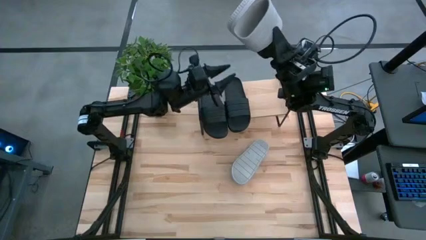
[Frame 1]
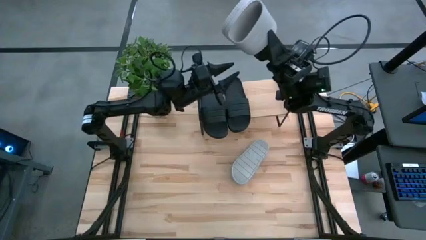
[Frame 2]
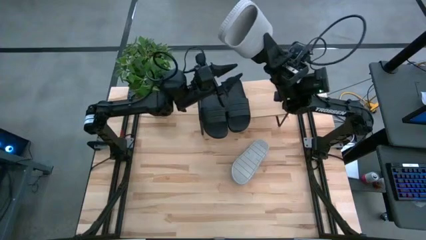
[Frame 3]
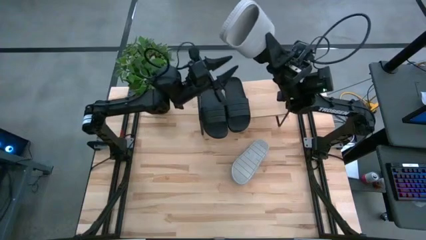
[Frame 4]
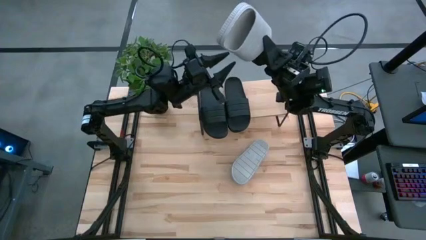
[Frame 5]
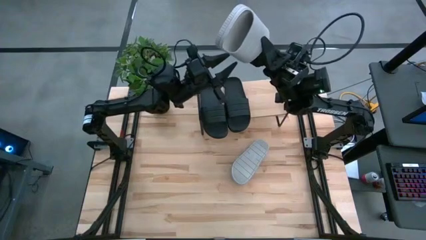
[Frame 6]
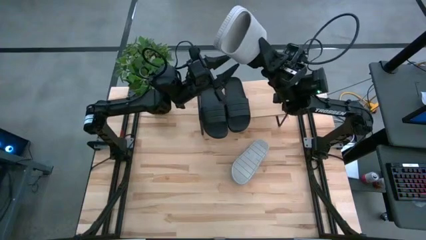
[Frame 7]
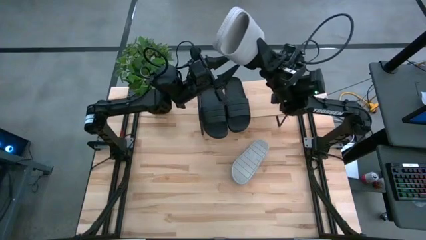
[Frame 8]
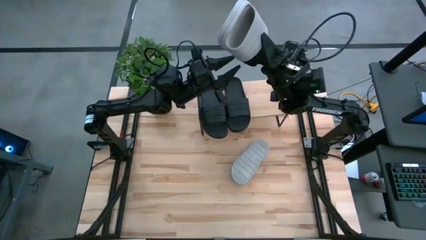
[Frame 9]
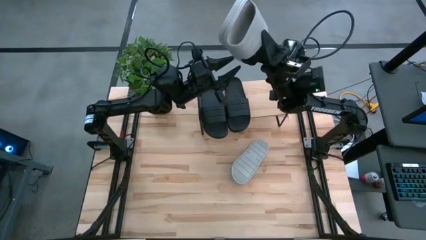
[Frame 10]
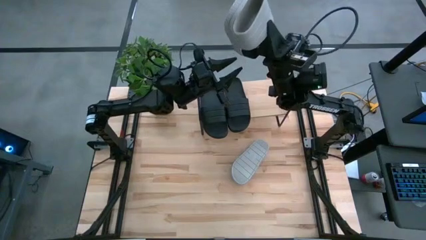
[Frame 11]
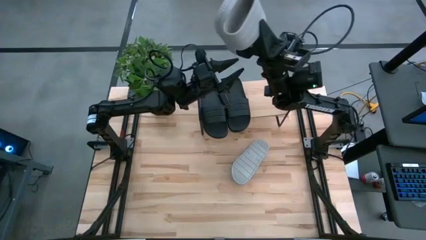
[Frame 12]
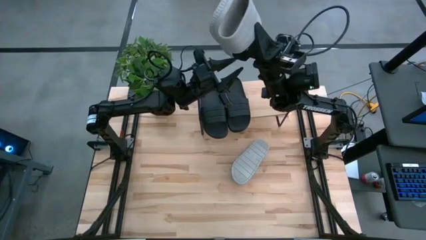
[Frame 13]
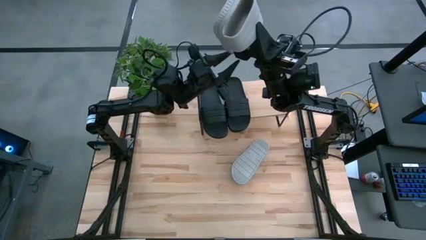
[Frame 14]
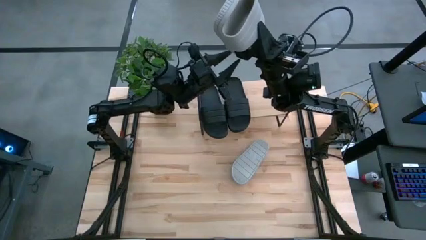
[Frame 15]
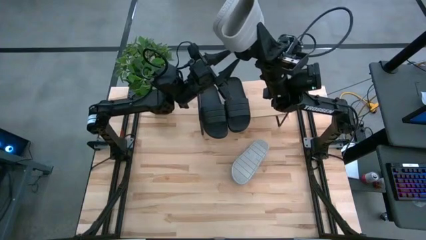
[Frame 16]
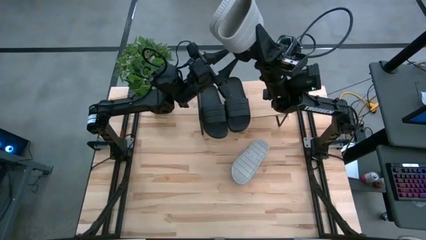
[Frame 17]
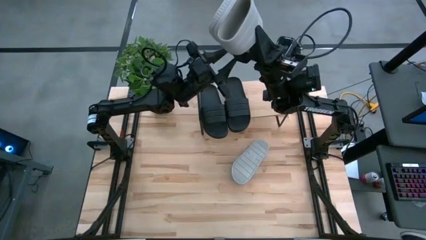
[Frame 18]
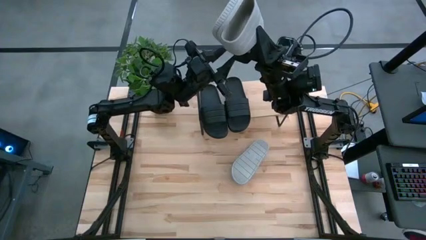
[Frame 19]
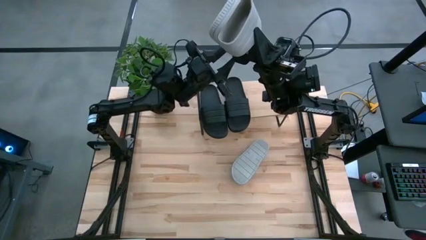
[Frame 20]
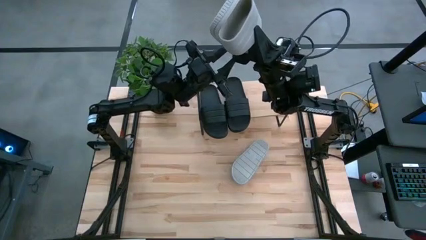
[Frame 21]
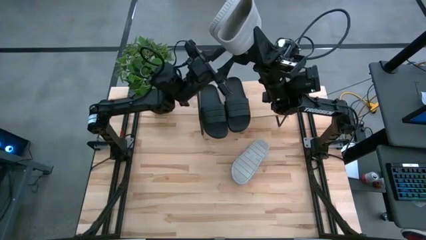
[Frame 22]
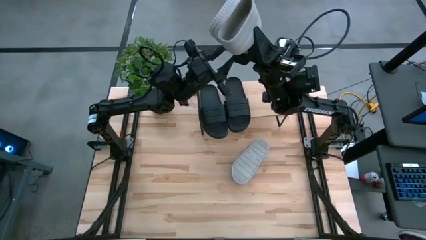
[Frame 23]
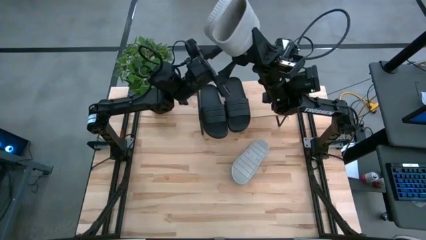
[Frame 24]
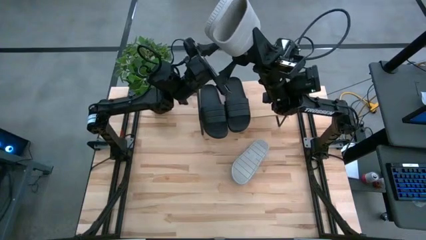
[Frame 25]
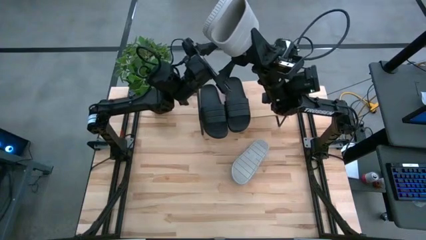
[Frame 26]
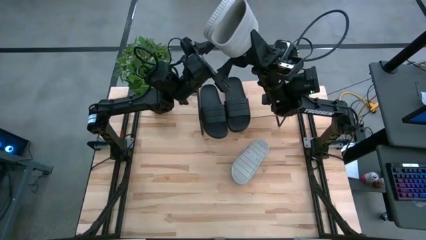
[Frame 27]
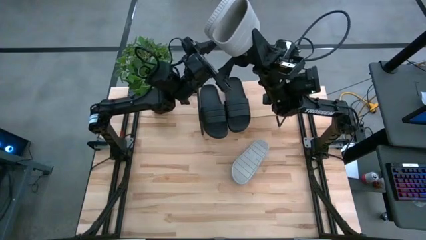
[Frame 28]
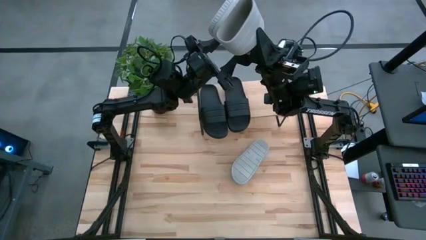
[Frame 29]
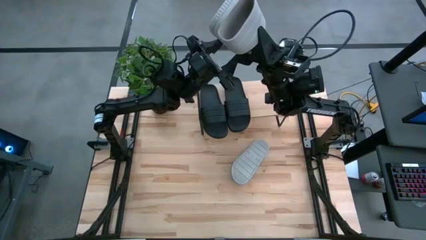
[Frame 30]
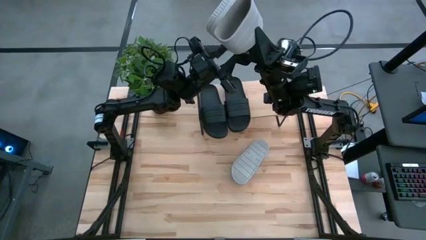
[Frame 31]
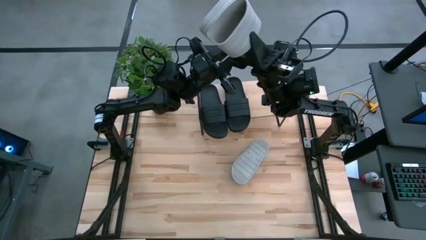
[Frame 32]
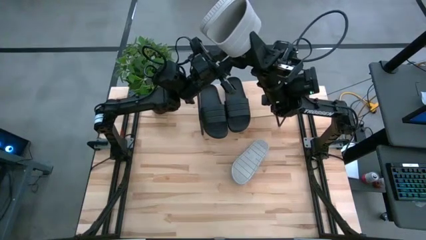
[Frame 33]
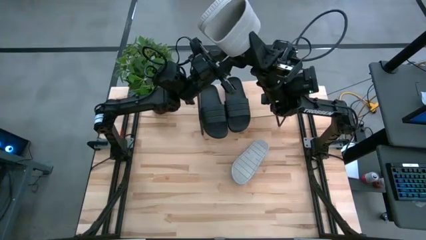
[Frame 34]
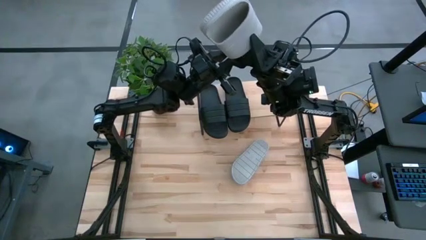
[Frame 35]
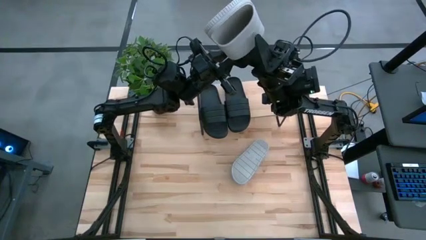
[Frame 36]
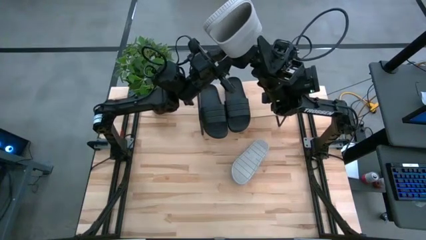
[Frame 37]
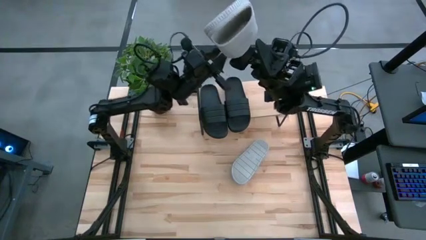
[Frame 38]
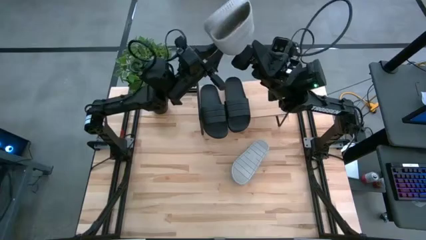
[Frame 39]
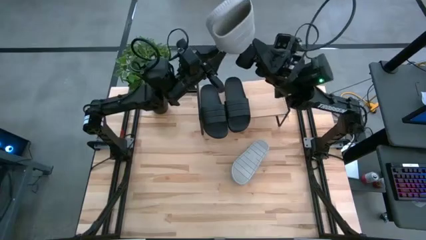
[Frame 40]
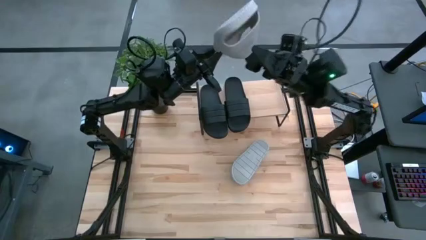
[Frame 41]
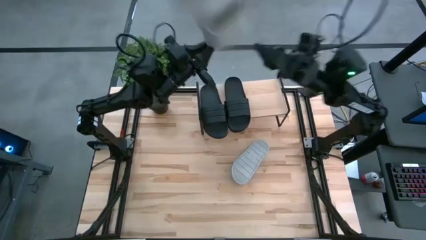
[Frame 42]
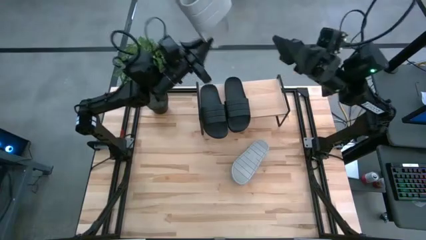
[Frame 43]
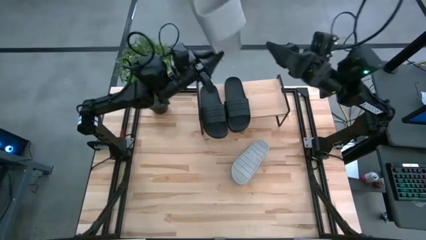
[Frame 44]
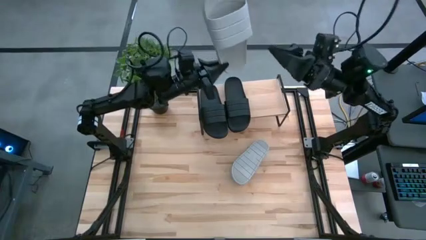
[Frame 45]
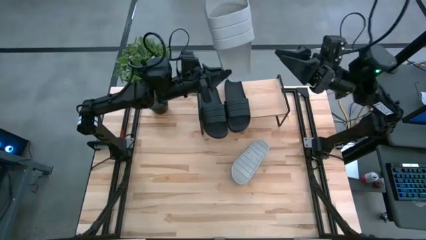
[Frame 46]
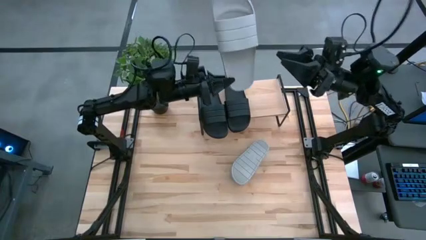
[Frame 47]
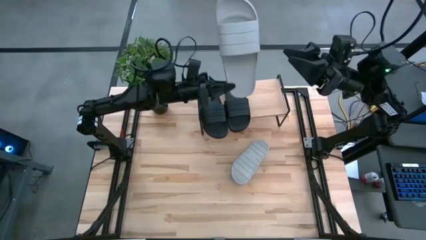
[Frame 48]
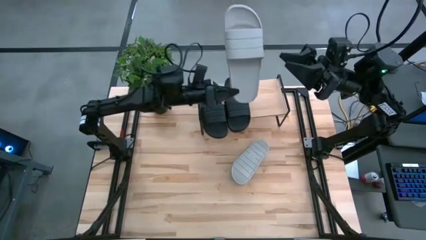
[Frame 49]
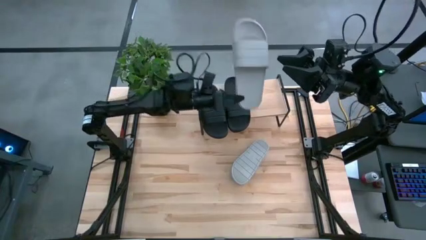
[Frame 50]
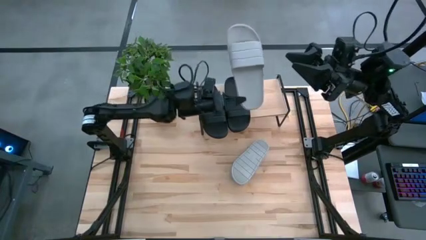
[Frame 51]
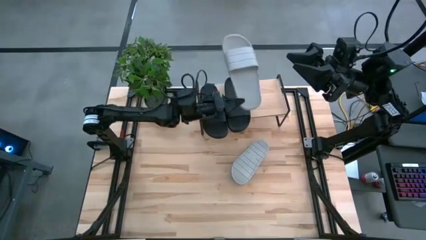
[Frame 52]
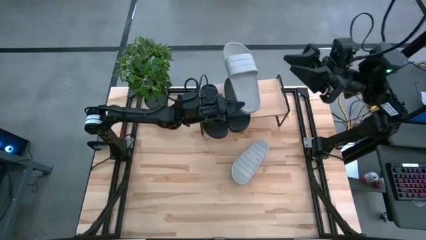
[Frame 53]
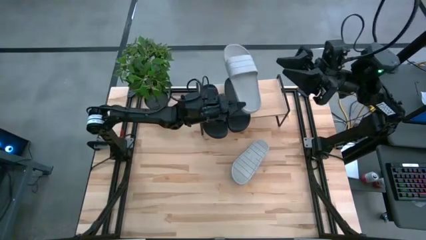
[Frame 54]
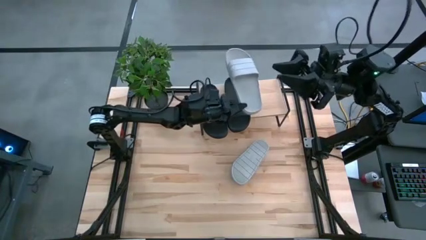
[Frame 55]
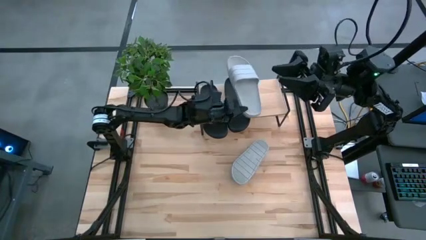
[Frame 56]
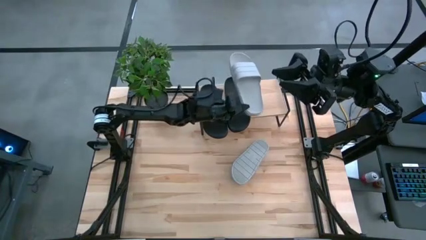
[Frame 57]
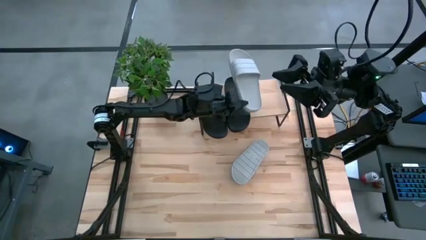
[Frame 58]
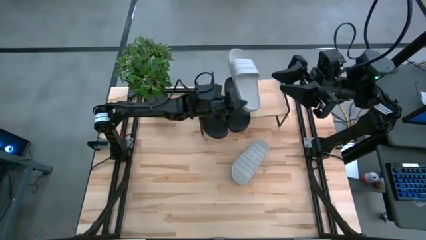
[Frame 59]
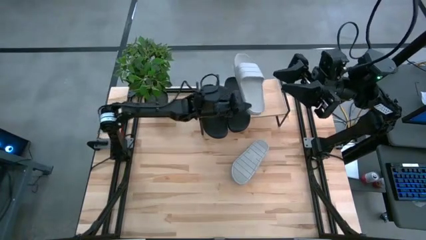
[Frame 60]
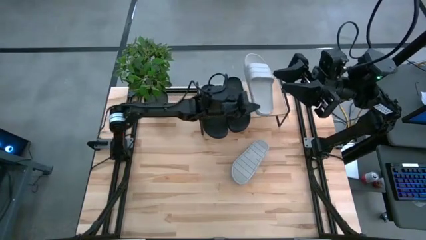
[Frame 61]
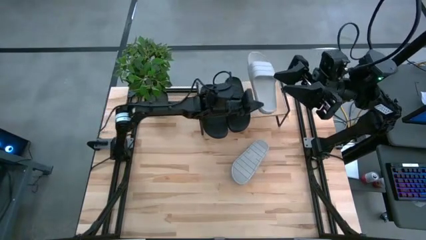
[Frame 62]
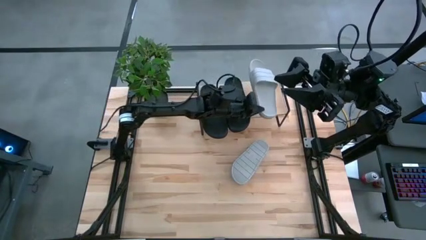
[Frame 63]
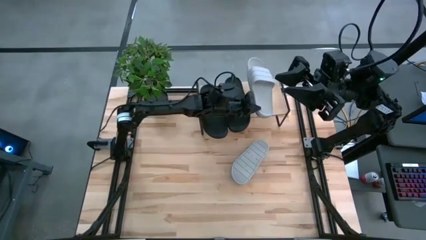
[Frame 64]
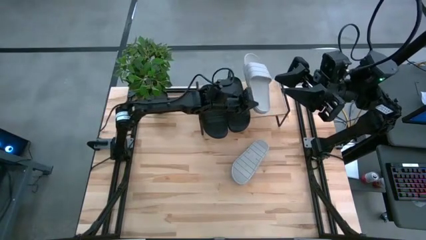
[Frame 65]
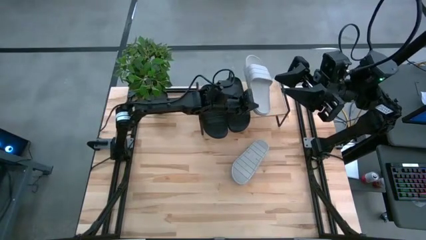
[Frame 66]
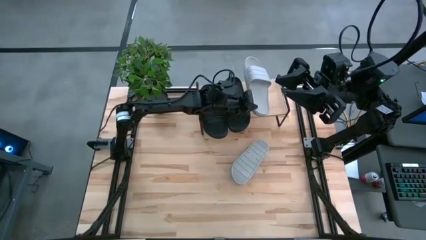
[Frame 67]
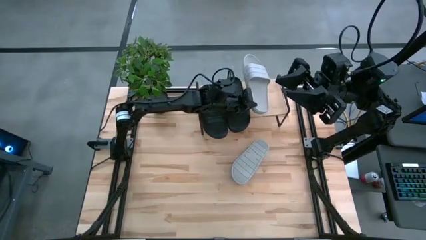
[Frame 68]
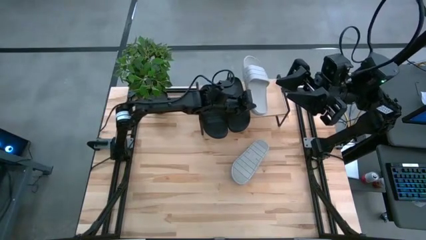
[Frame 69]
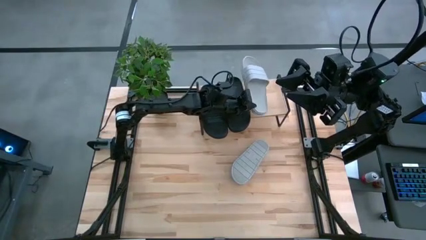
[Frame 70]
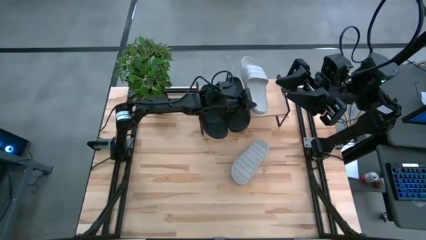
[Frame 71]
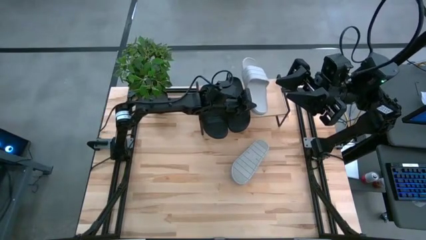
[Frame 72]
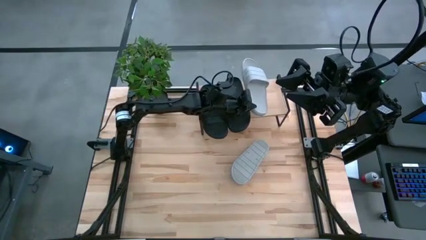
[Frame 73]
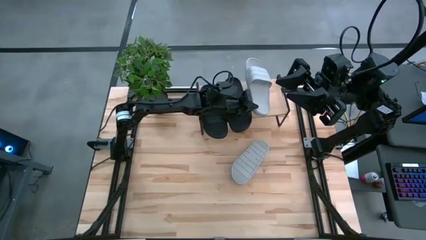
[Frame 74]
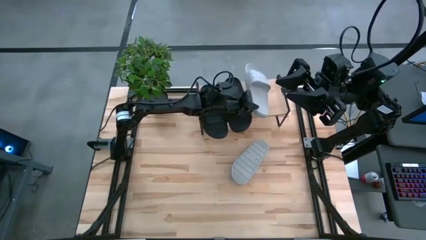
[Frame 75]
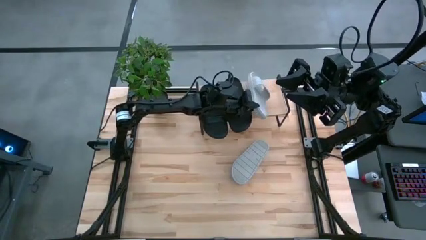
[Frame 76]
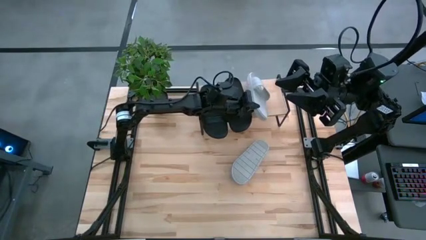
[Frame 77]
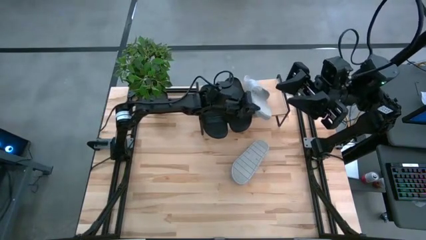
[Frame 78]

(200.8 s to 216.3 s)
Task: Pick and place slides into the shelf
Put the right gray slide on the shelf
